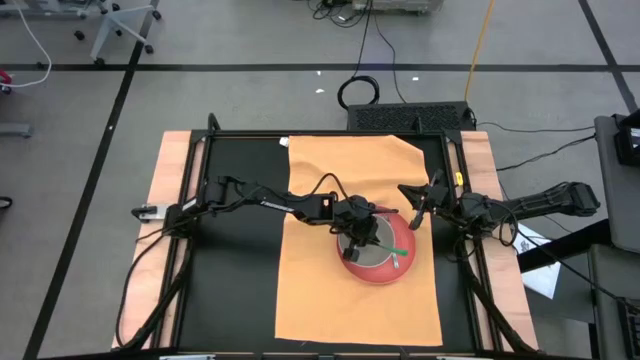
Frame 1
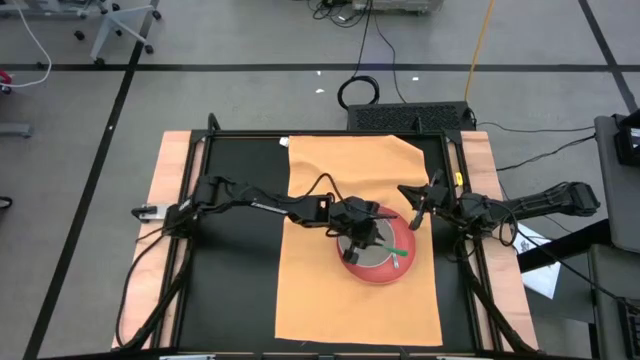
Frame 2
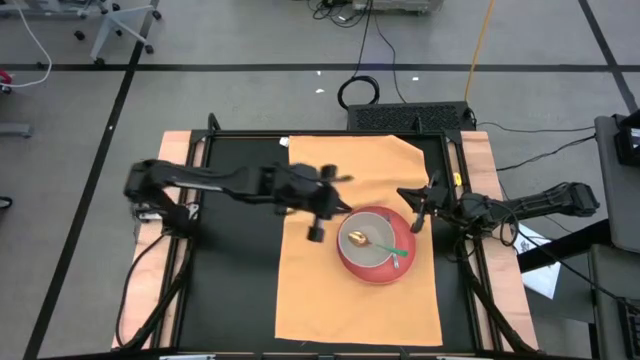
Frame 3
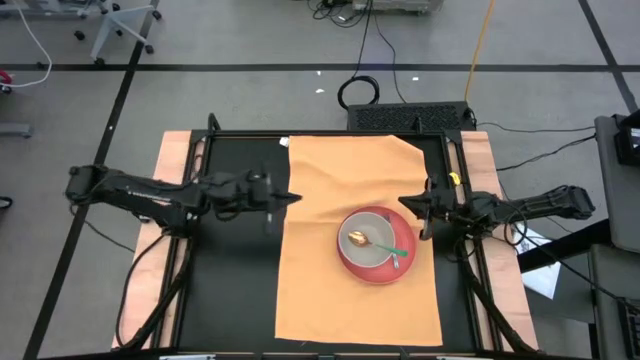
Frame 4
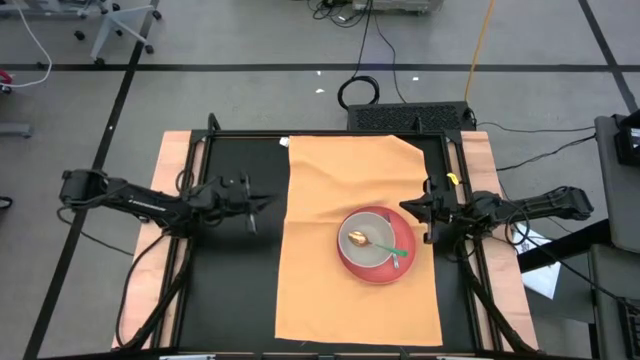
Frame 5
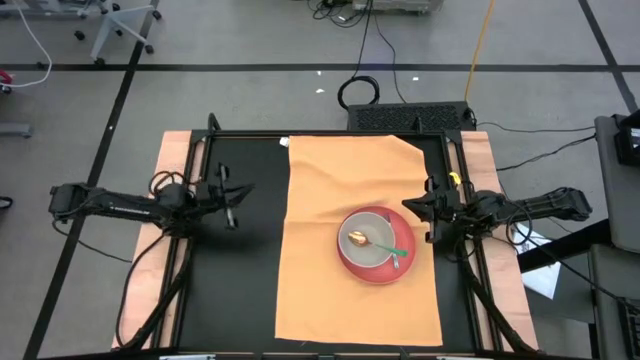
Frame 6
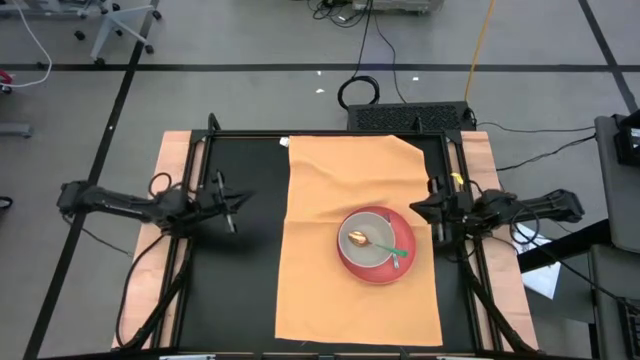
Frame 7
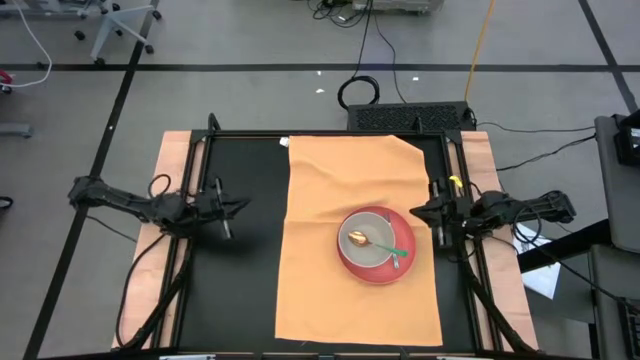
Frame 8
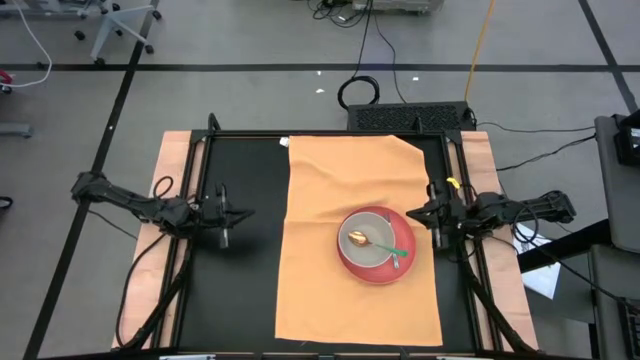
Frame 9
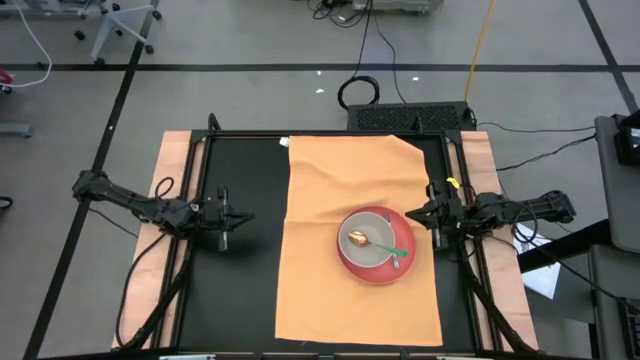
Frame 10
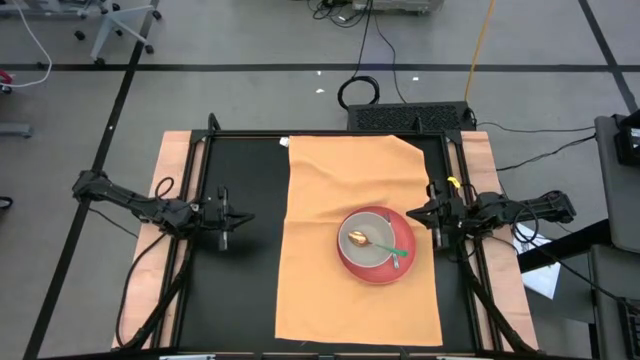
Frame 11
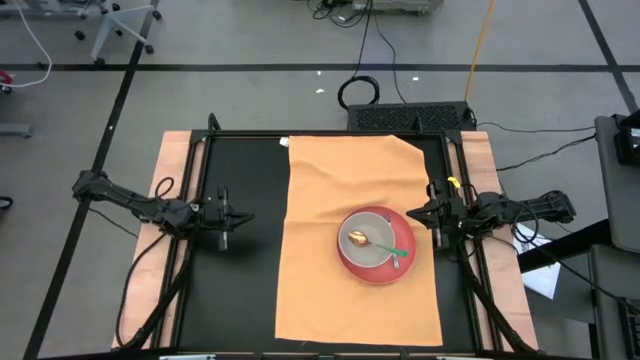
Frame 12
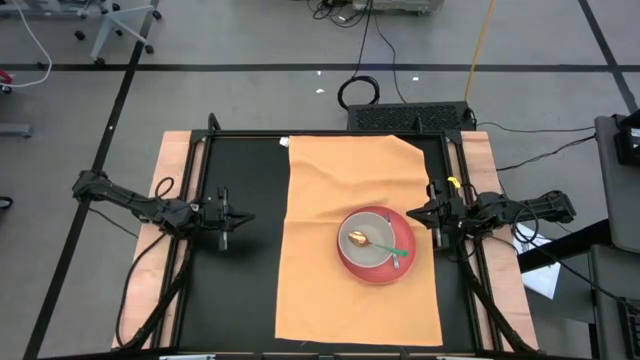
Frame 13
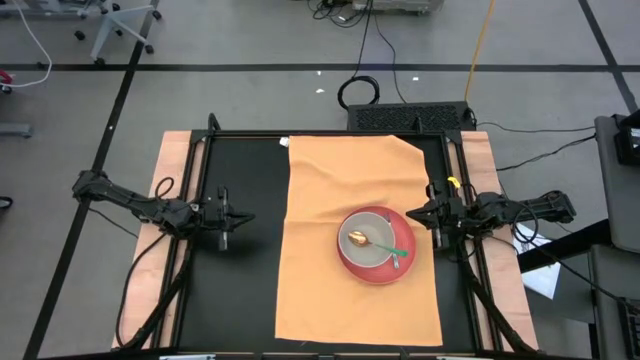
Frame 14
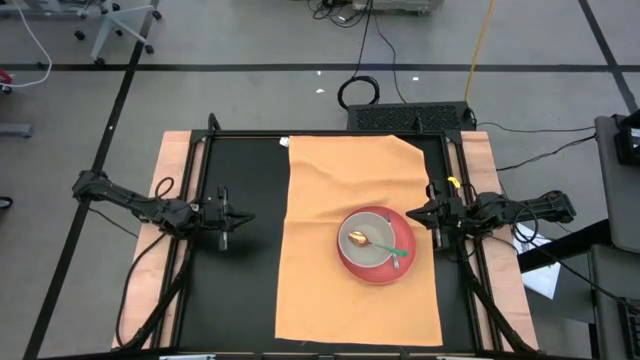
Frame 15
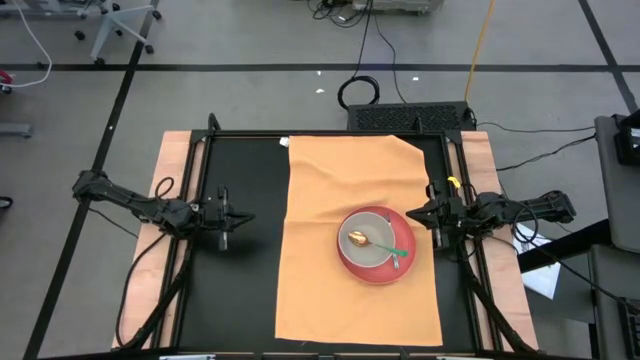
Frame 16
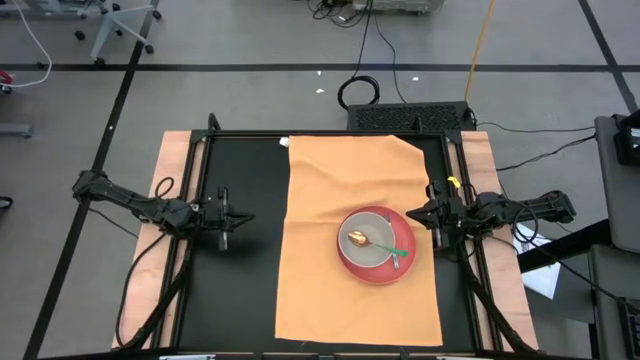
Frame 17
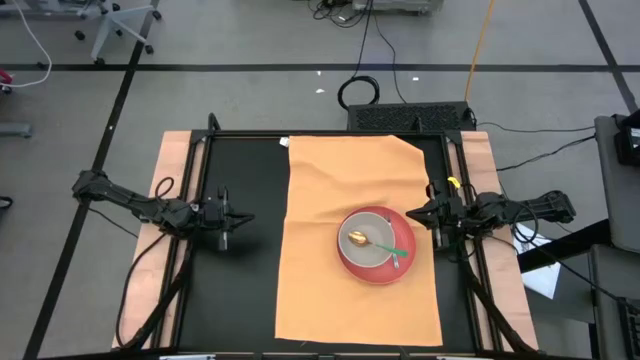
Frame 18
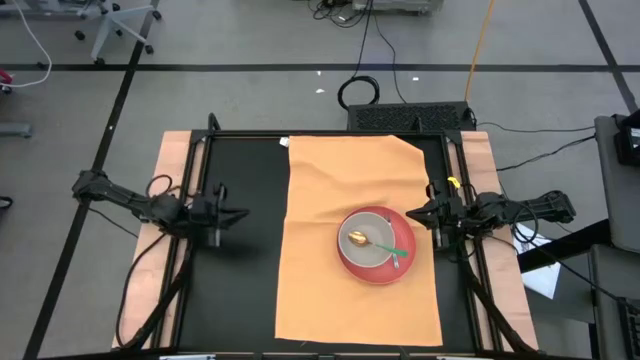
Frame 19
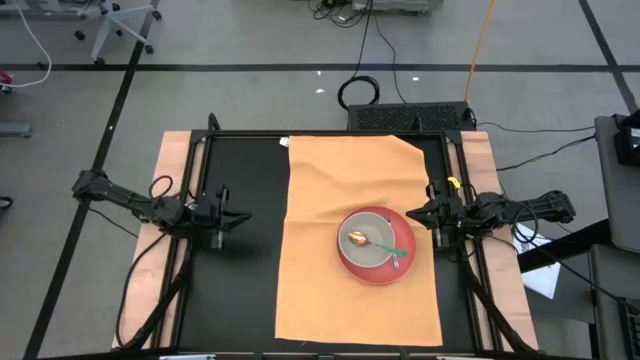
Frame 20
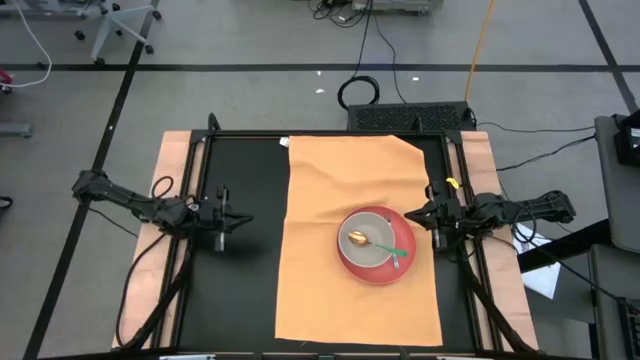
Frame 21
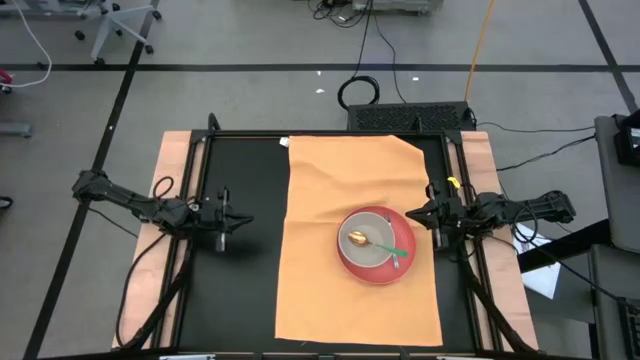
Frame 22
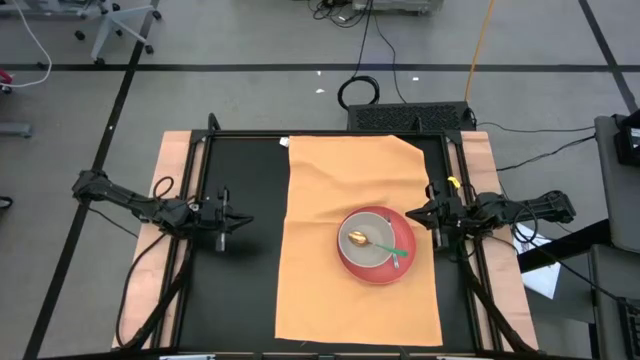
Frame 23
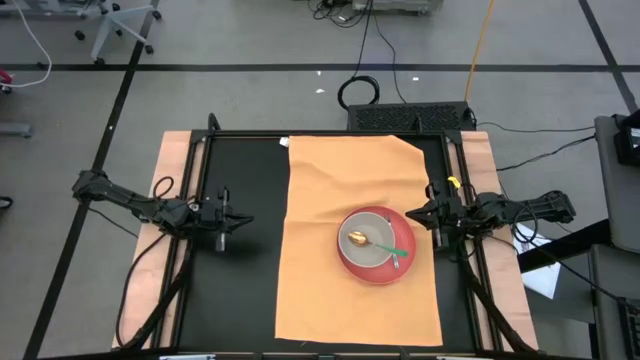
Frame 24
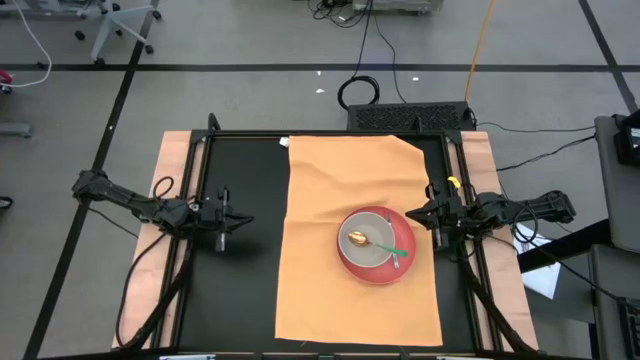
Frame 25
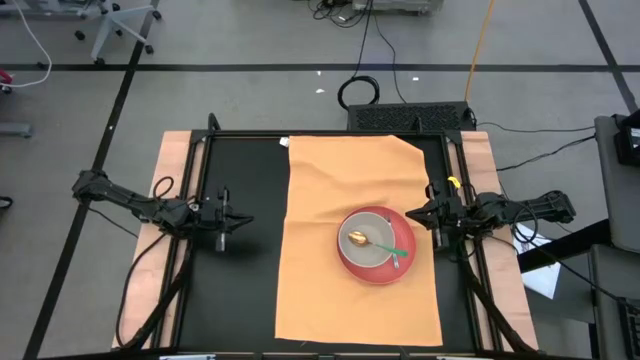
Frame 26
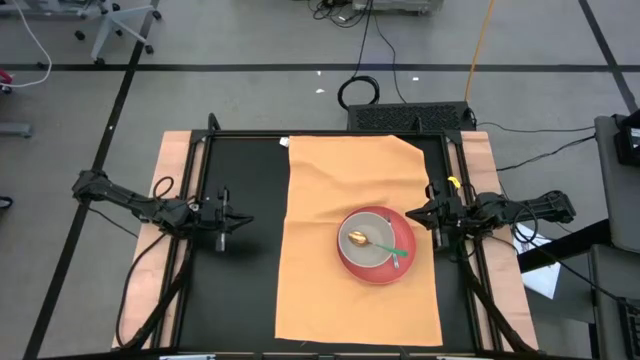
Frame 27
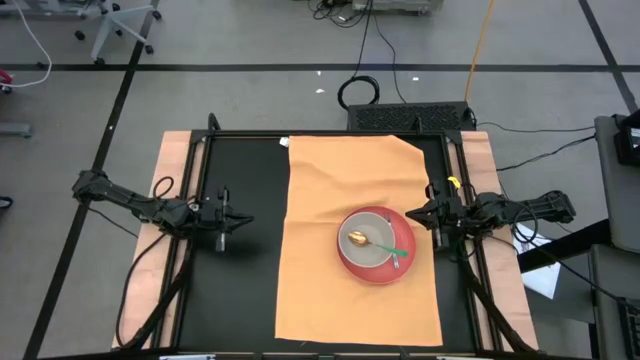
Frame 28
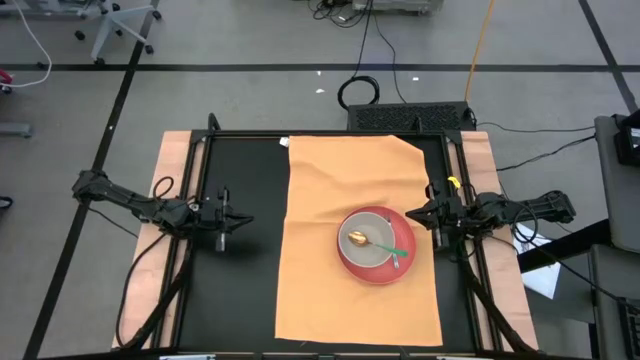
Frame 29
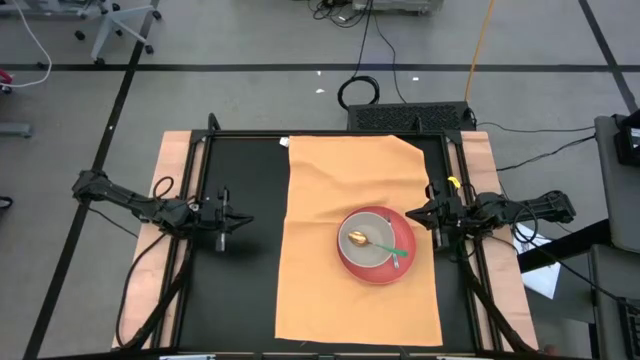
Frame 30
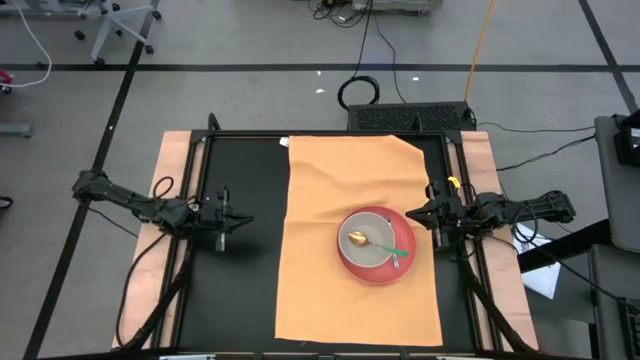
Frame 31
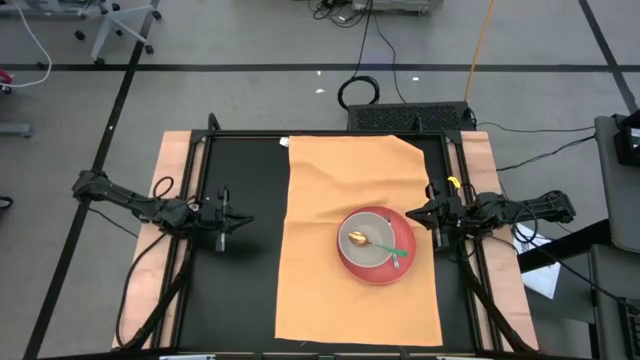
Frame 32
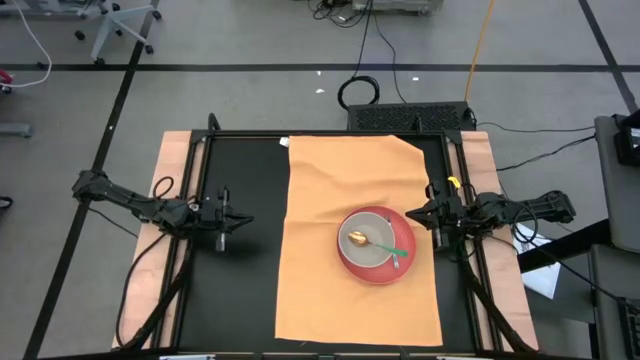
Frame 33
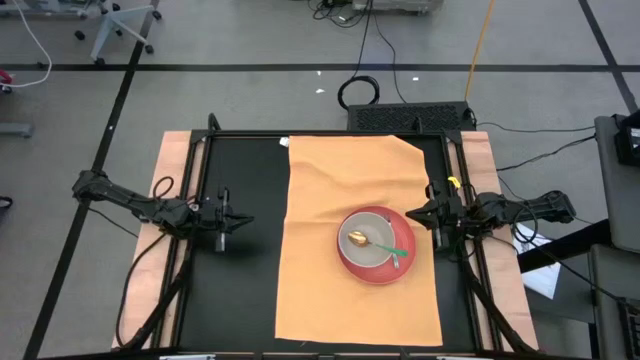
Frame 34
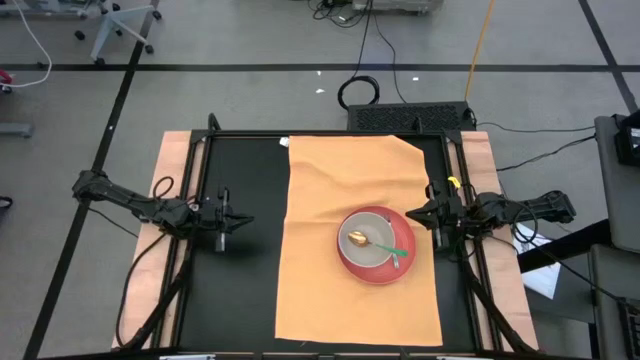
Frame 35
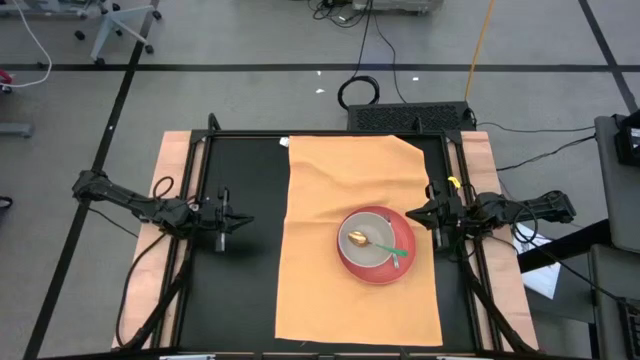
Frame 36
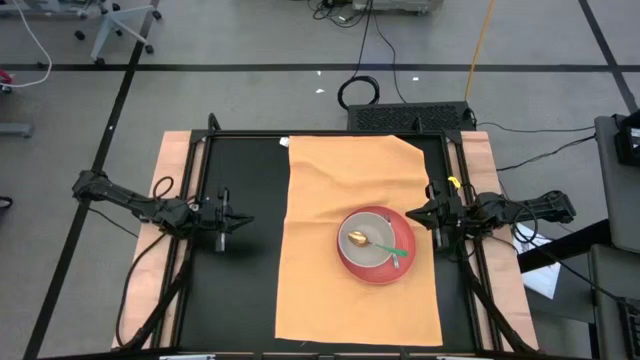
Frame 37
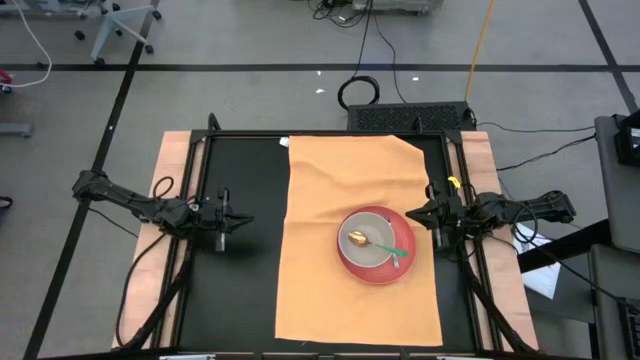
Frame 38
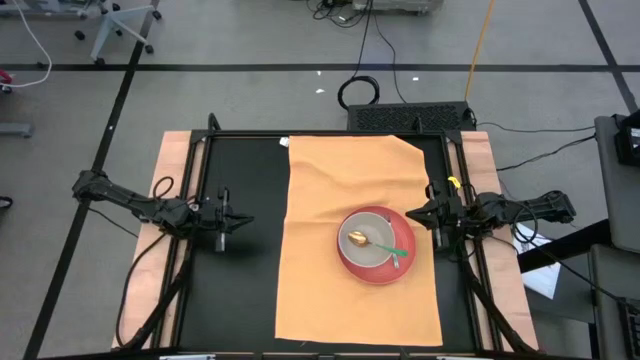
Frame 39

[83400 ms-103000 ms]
Task: Set table place
Return to Home Position

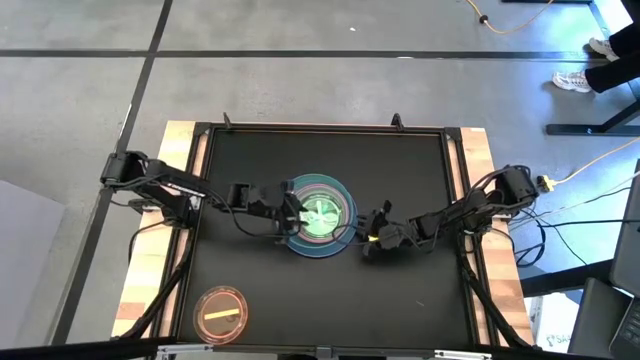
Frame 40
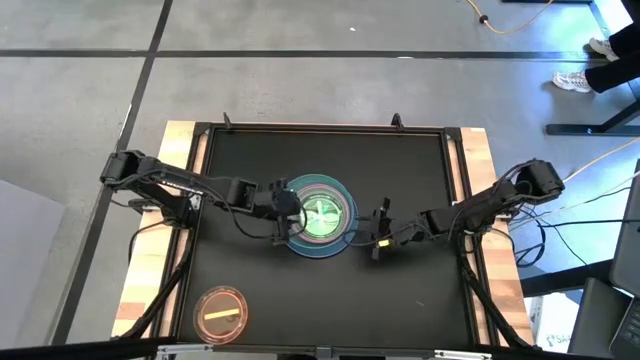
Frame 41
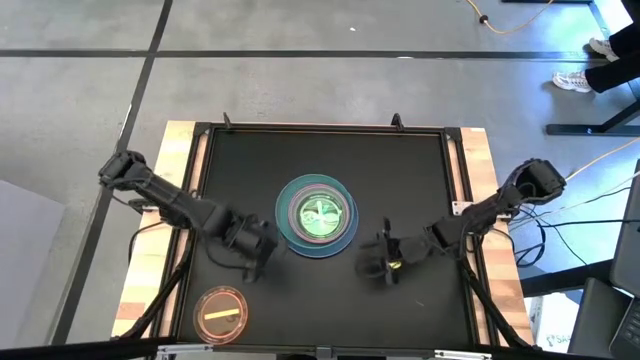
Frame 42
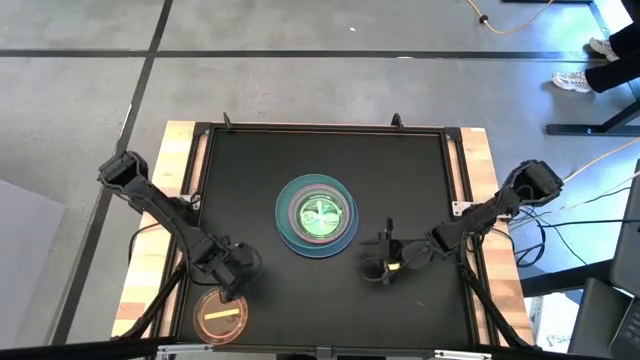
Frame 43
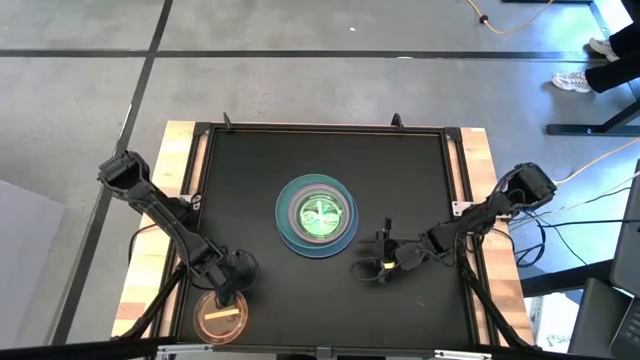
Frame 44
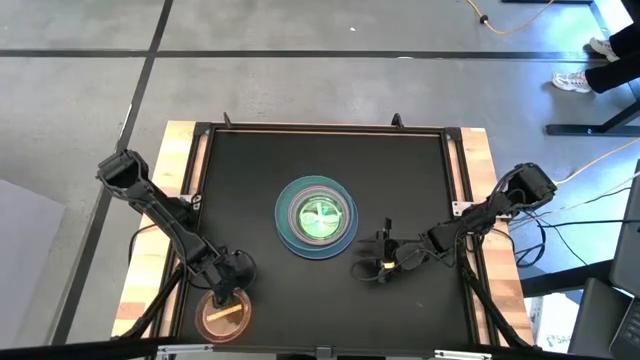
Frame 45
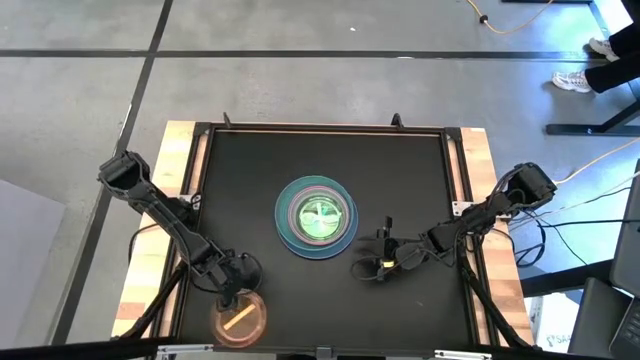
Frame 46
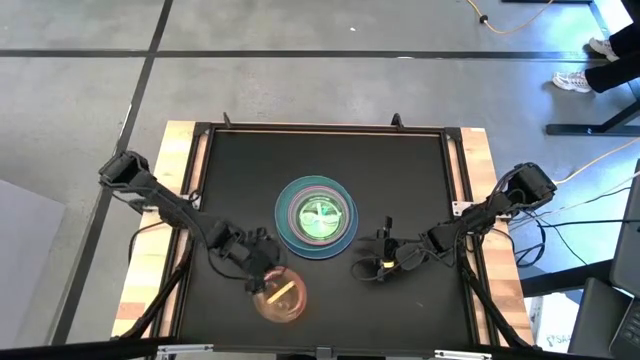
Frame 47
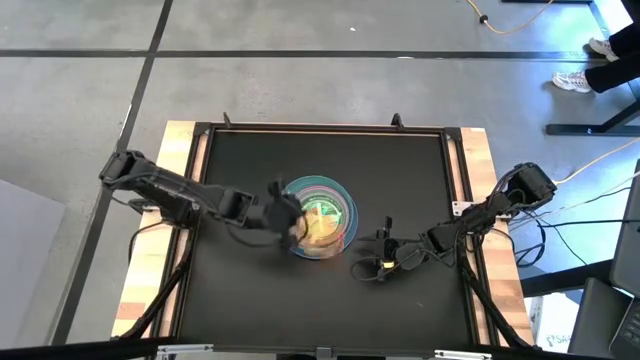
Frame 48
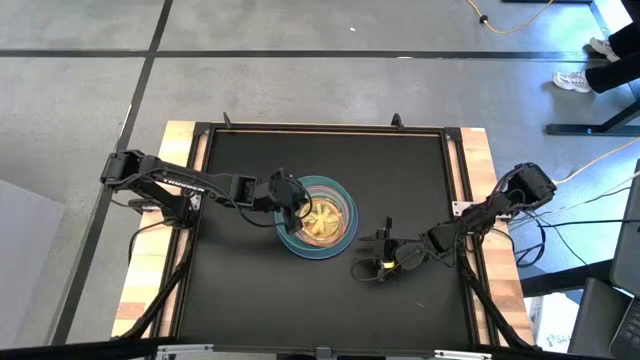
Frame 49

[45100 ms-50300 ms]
Task: Stack plastic plates
Stack the orange plate on top of the light green plate
